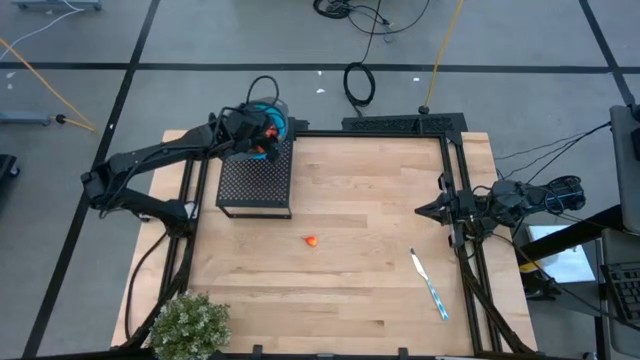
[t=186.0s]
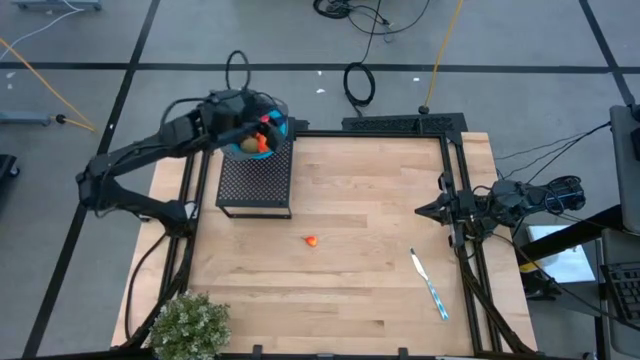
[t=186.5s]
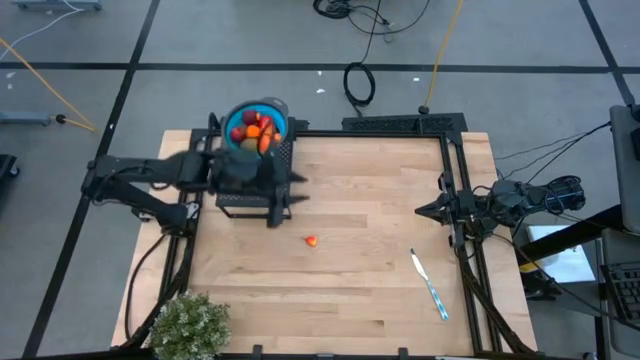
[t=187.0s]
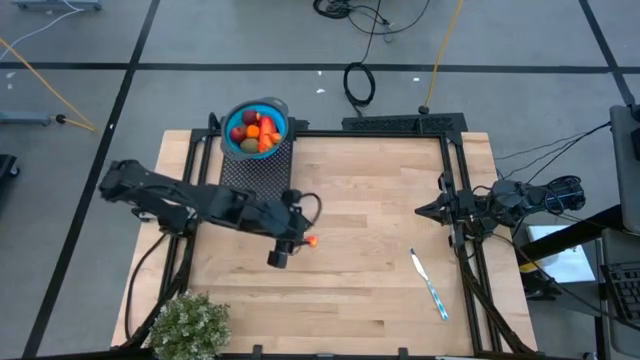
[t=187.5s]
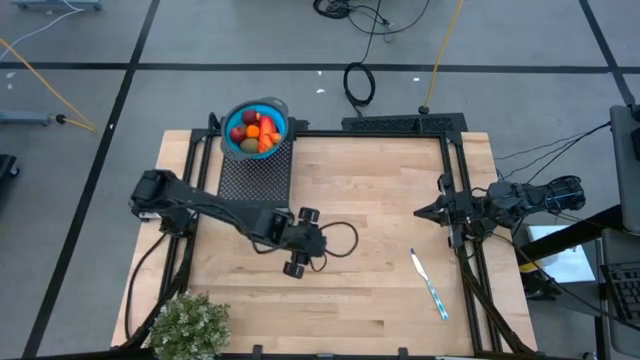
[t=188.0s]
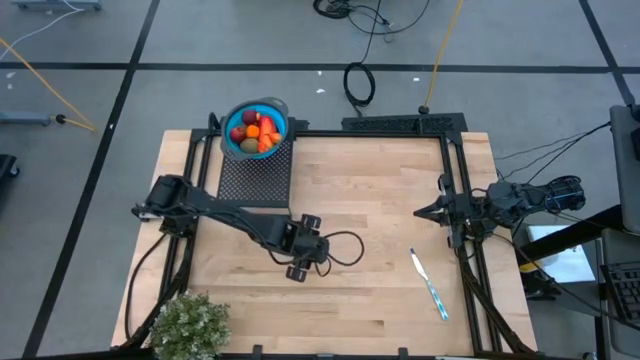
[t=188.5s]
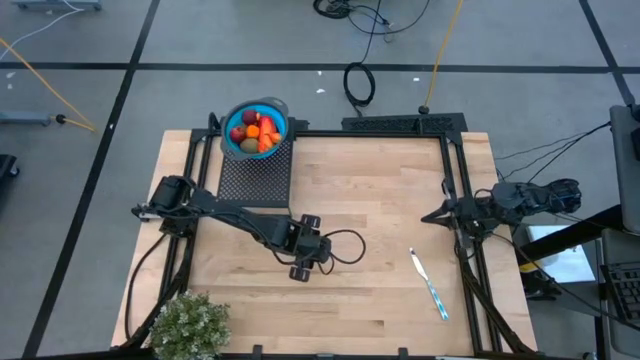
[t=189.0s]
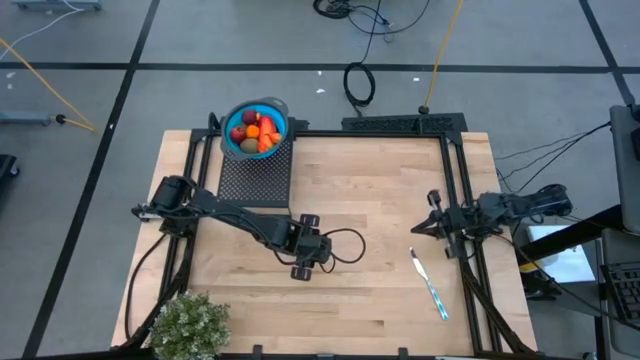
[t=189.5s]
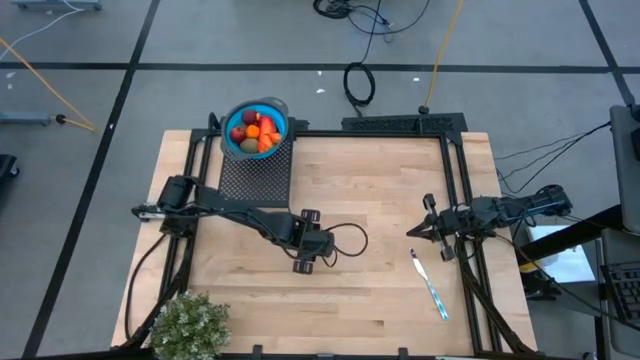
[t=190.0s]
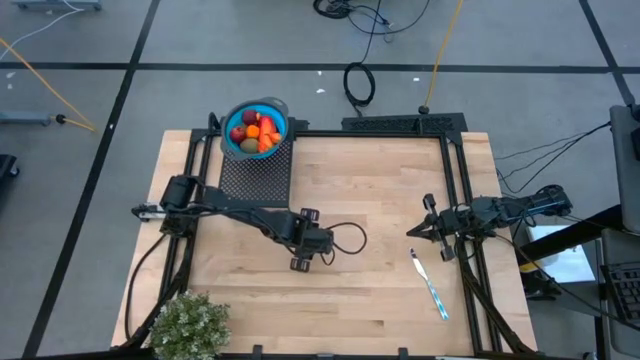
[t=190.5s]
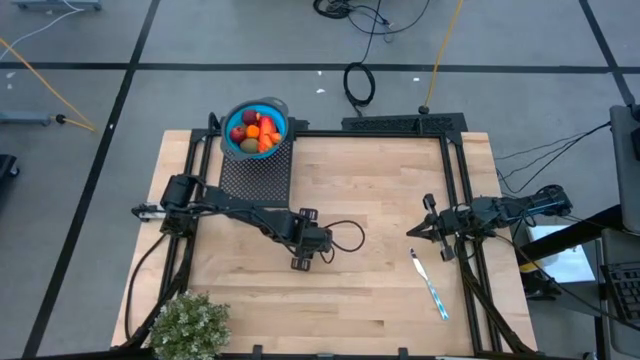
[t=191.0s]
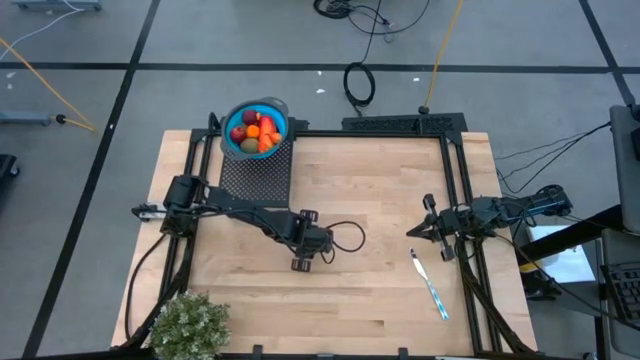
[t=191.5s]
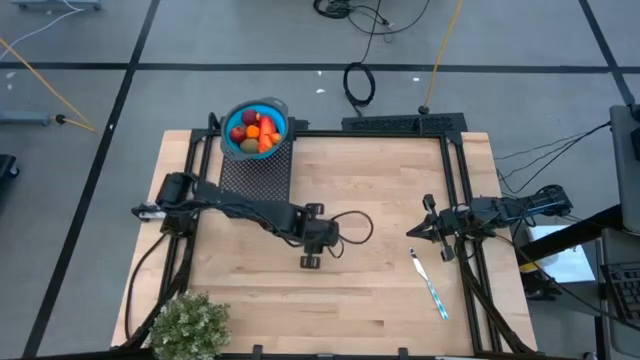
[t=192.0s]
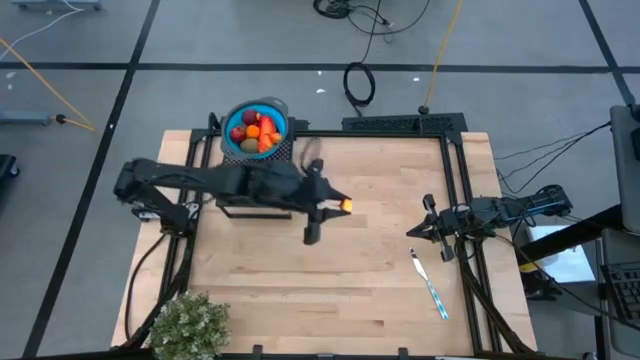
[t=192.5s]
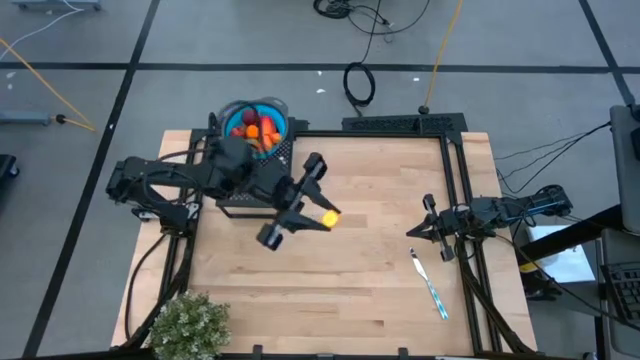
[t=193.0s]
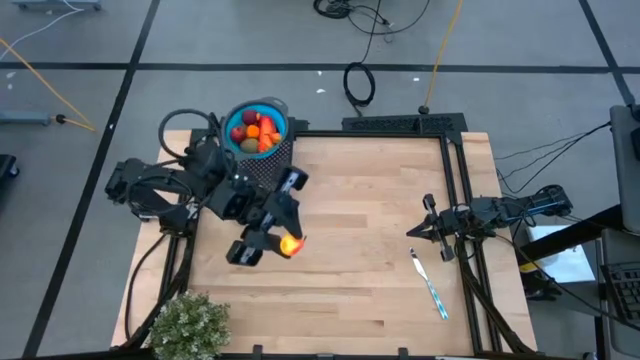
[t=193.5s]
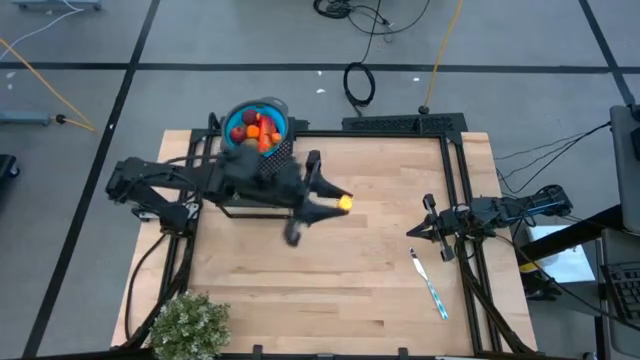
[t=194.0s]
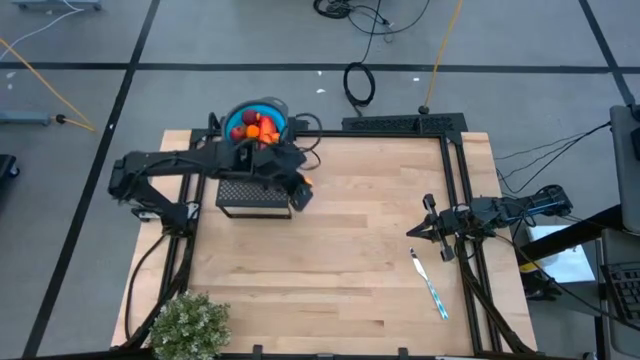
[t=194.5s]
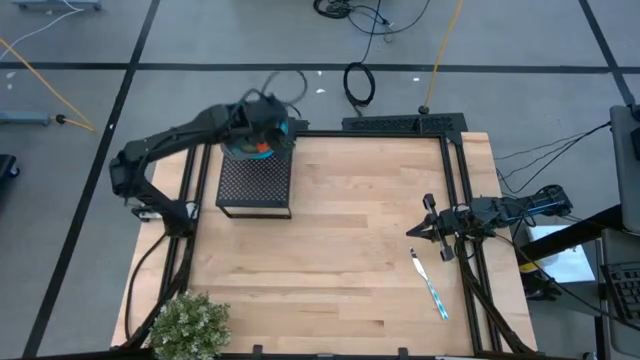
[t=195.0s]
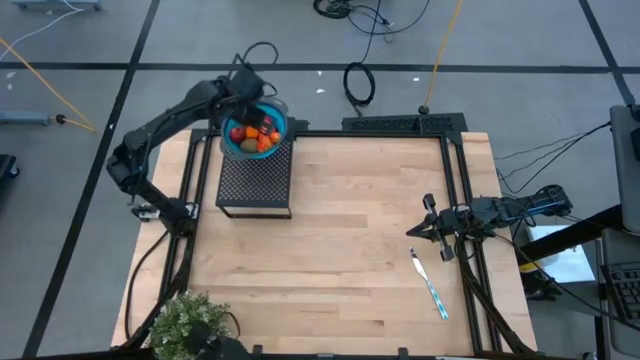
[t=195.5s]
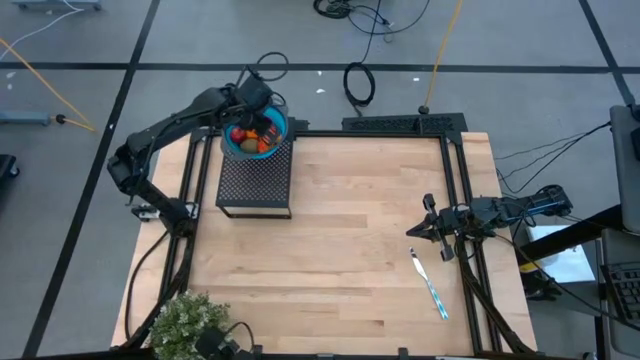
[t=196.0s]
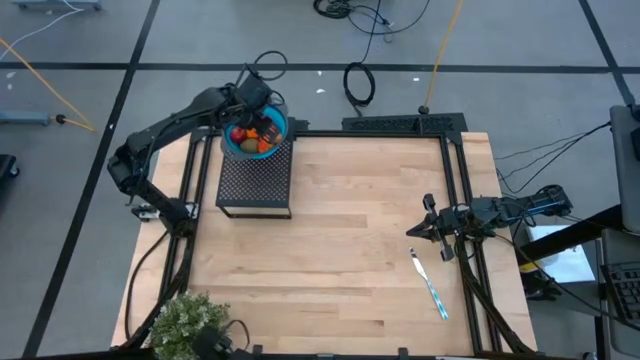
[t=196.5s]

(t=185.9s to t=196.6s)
Task: Pick & Place Fruit
Put the peach into the blue strainer bowl on the shelf

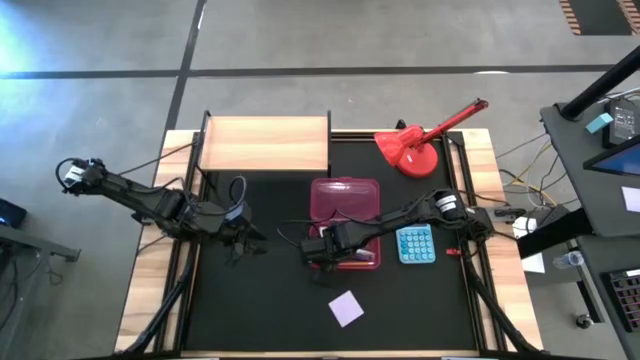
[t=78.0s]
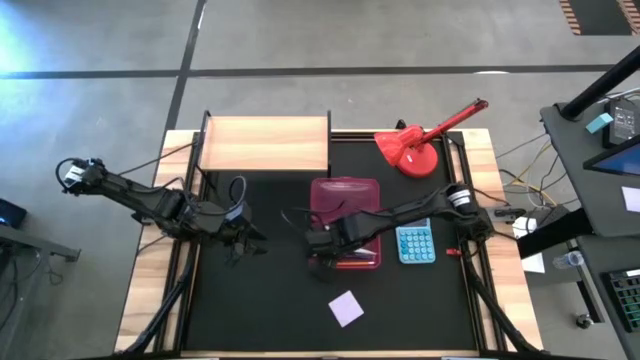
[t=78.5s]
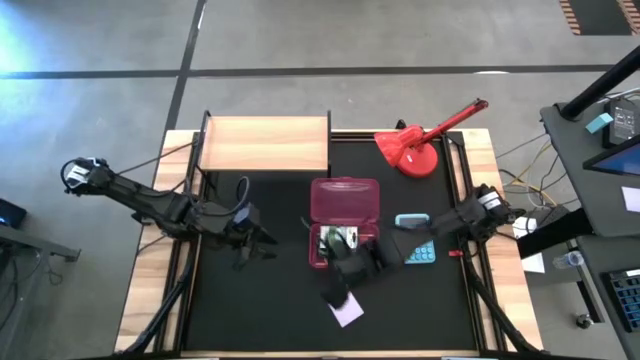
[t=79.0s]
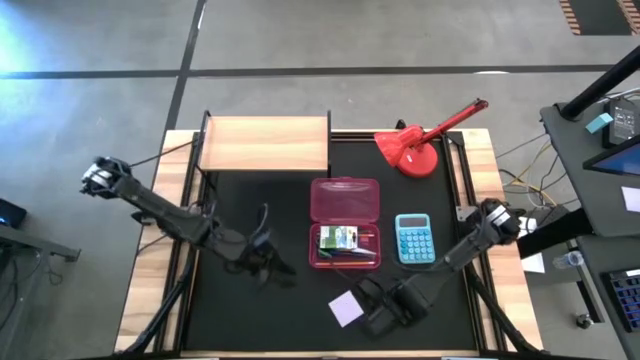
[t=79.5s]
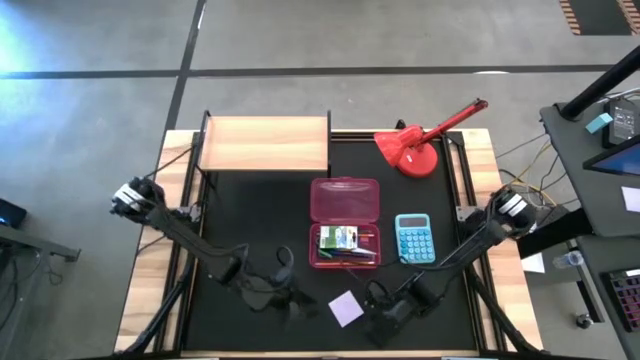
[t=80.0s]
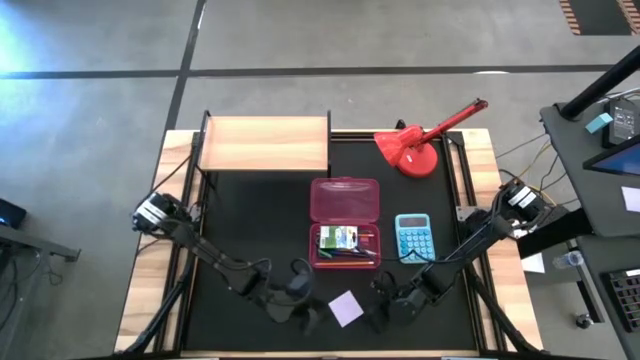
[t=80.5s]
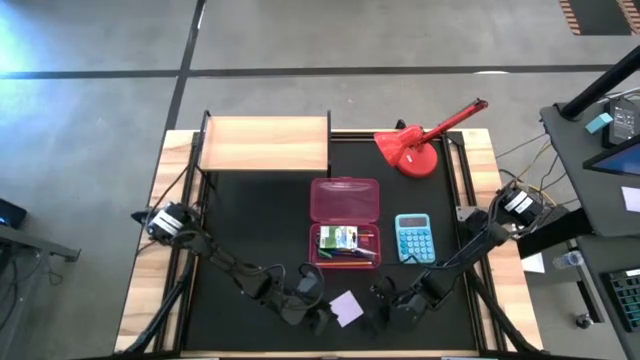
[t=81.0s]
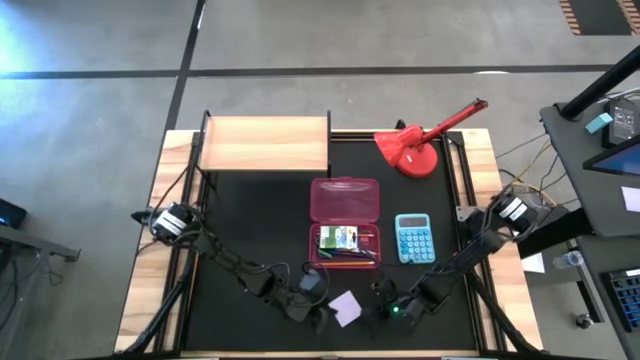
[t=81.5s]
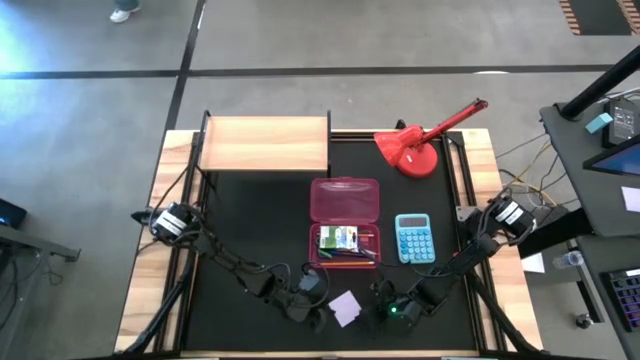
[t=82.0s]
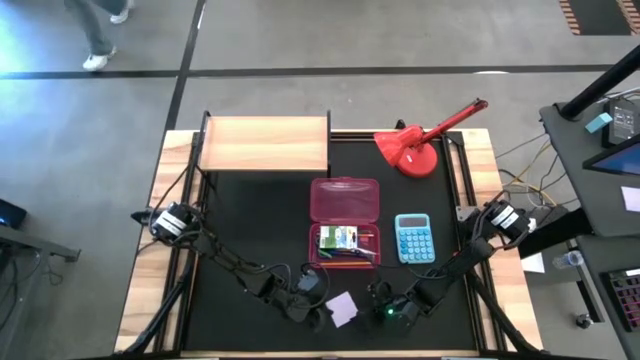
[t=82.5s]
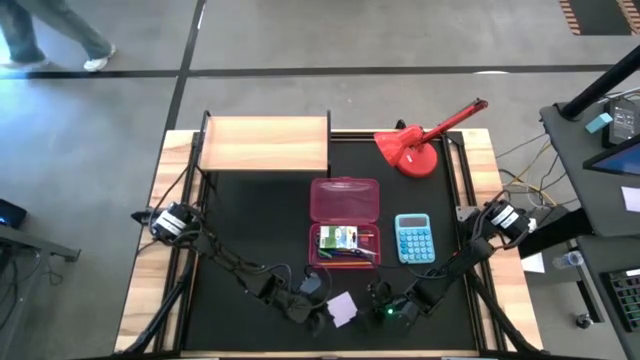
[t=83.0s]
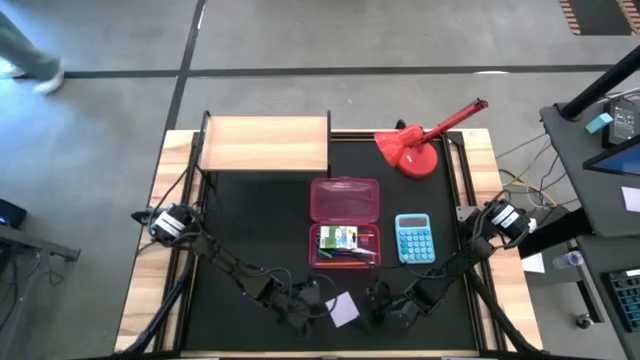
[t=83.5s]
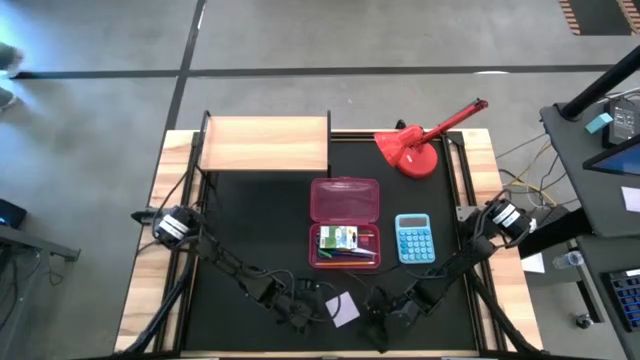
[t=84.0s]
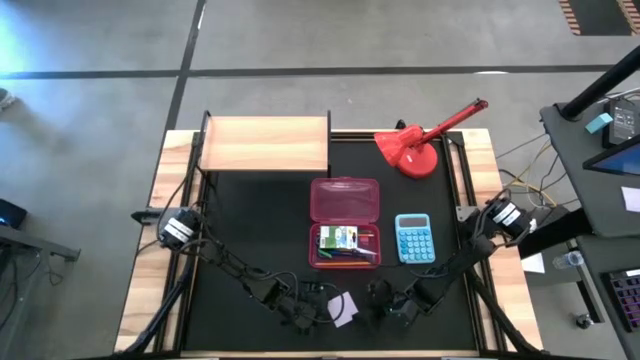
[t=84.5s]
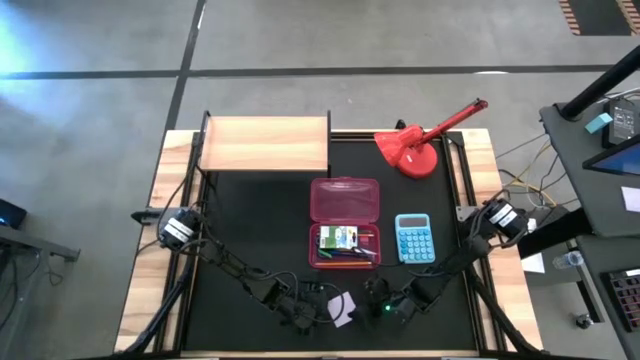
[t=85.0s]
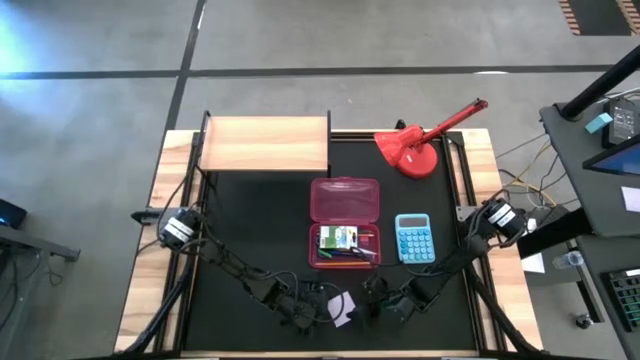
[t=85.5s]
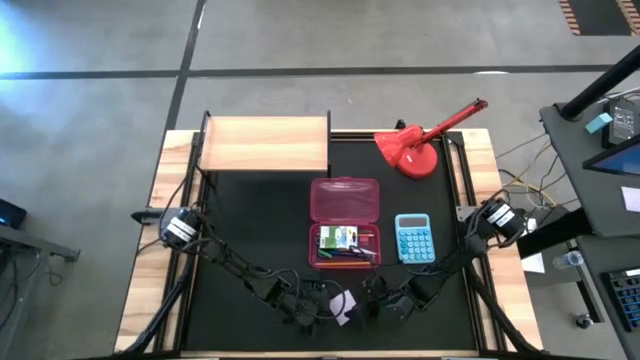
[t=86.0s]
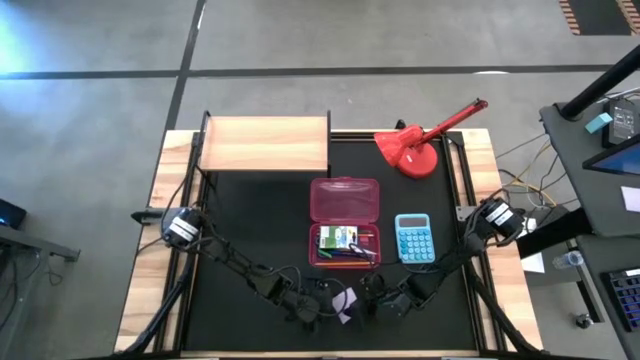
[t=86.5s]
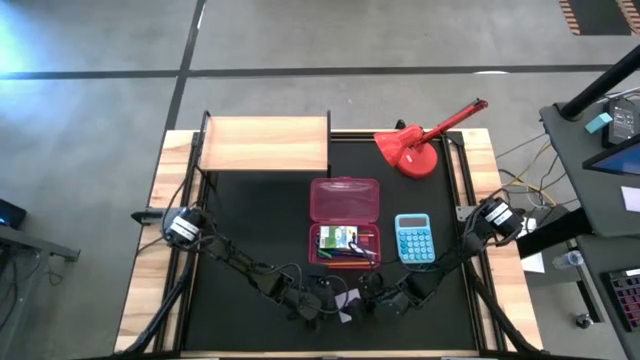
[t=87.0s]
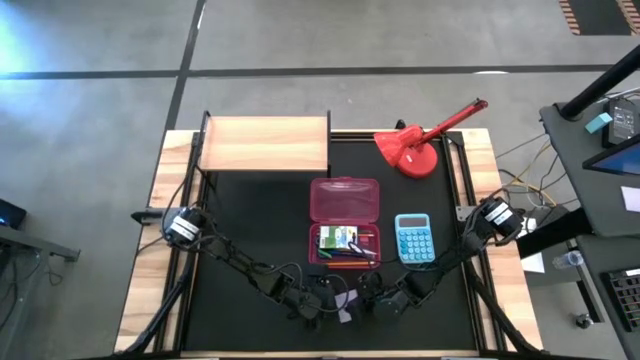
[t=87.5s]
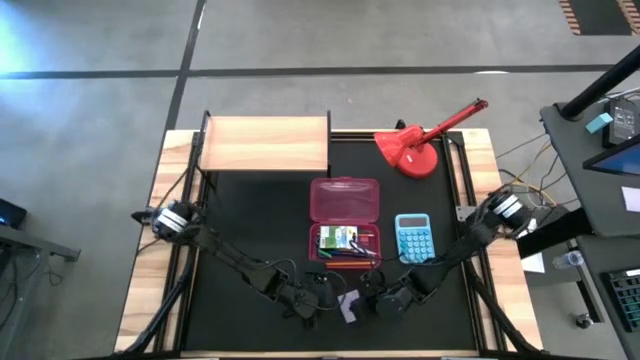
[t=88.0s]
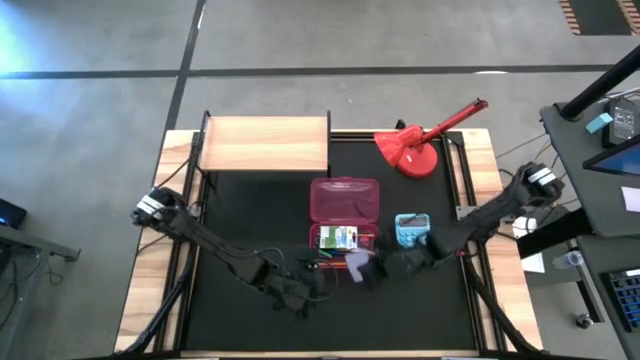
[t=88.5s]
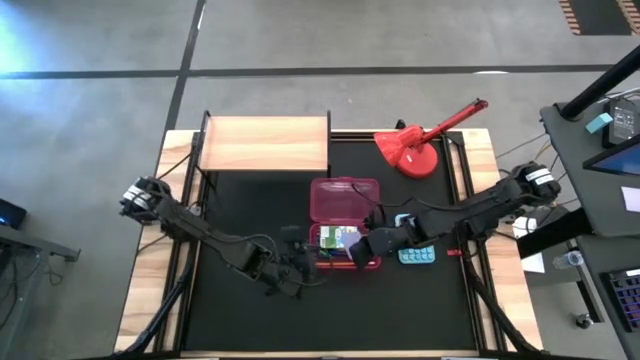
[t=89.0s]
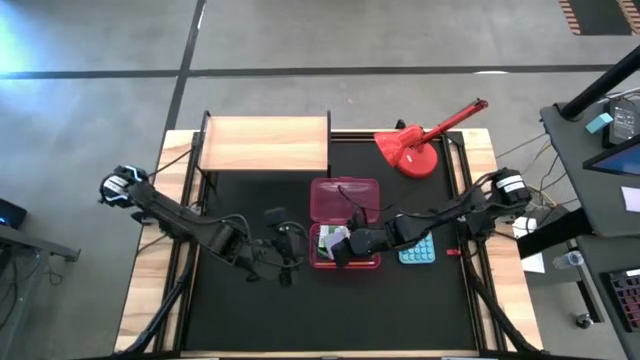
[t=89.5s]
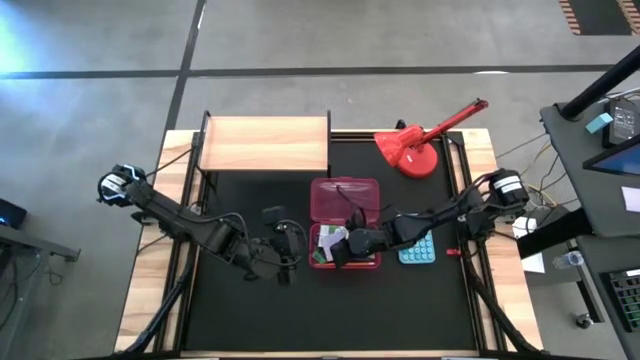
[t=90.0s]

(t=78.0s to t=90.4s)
Task: Pack school essentials
Put the purple sticky notes into the pink supply box
